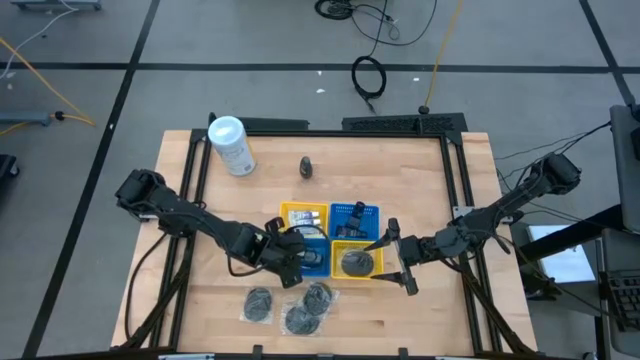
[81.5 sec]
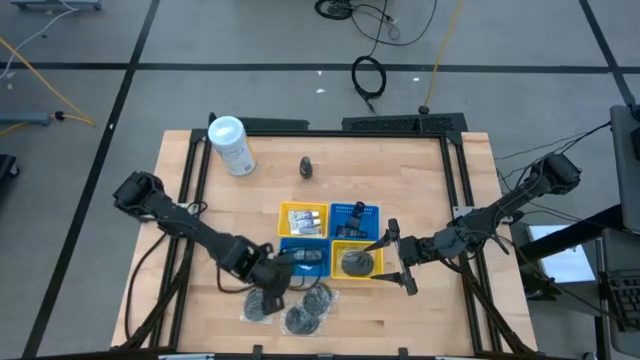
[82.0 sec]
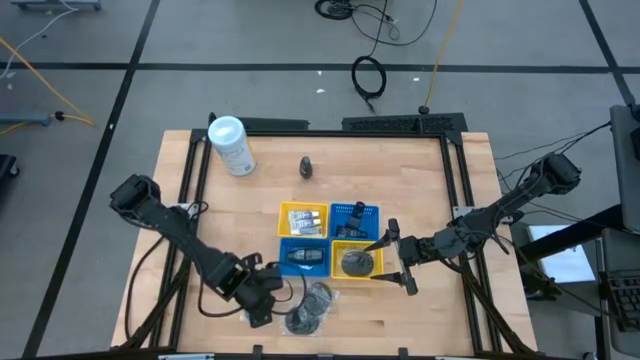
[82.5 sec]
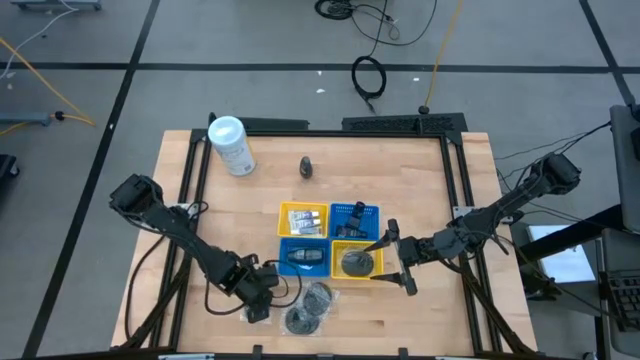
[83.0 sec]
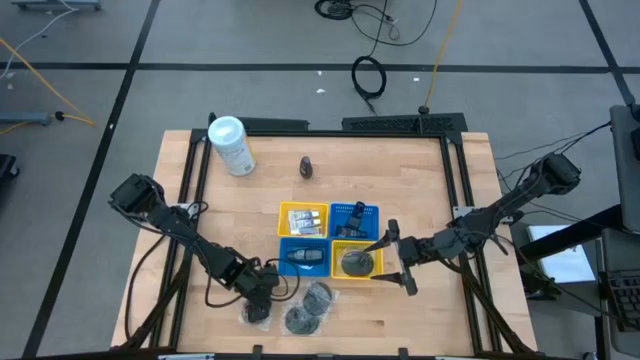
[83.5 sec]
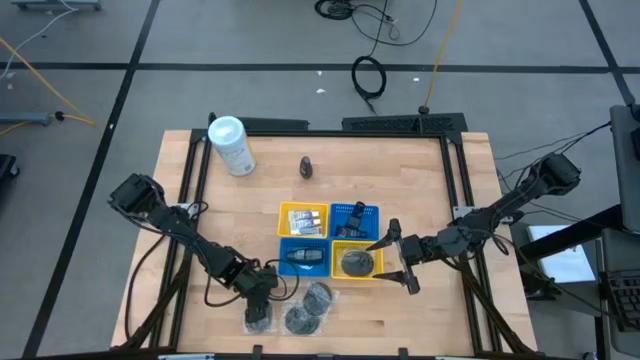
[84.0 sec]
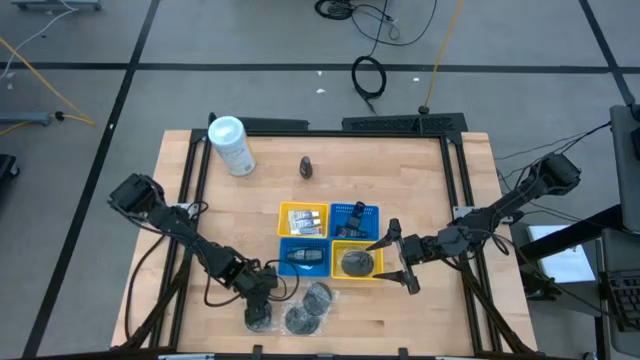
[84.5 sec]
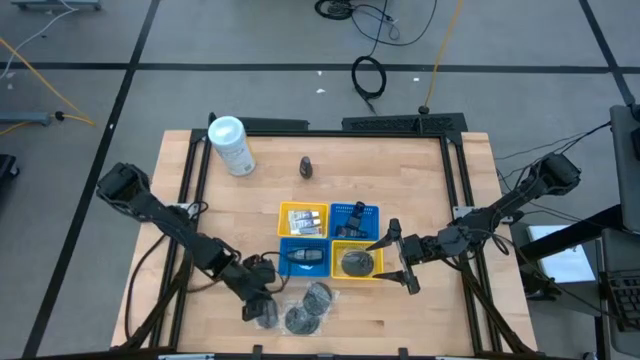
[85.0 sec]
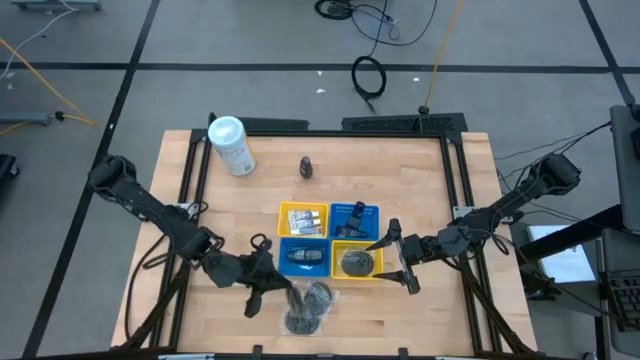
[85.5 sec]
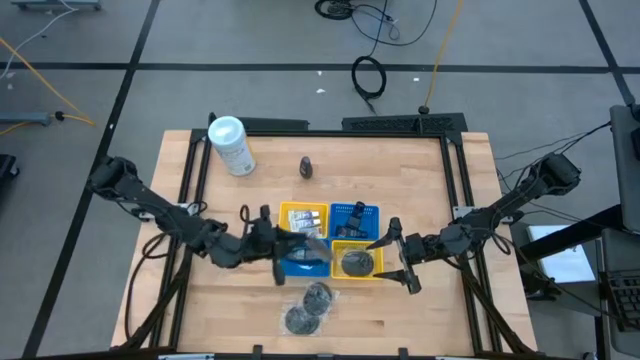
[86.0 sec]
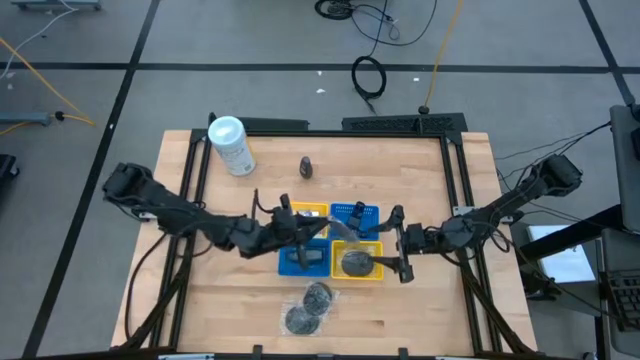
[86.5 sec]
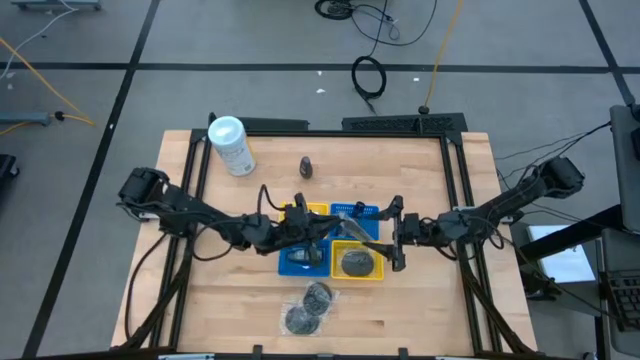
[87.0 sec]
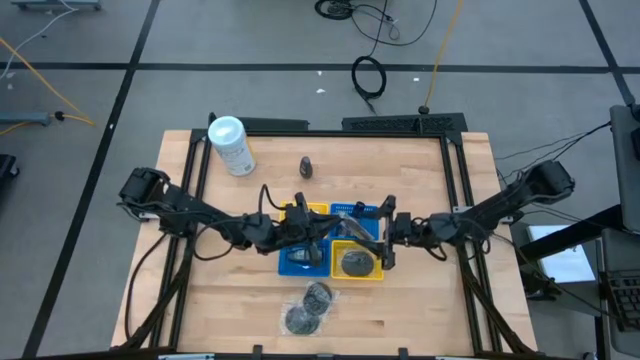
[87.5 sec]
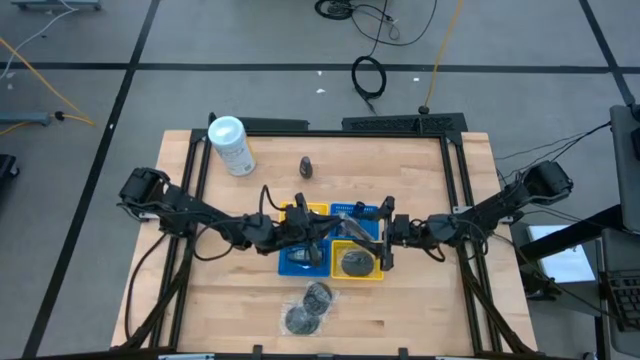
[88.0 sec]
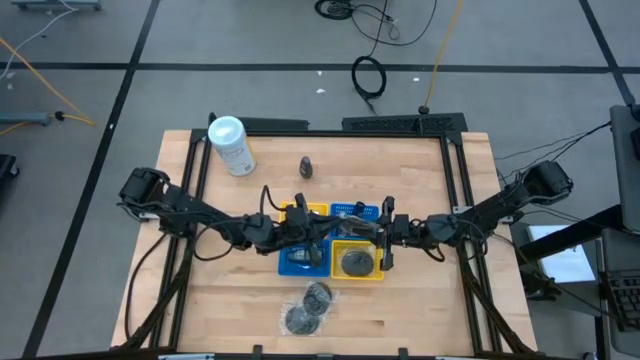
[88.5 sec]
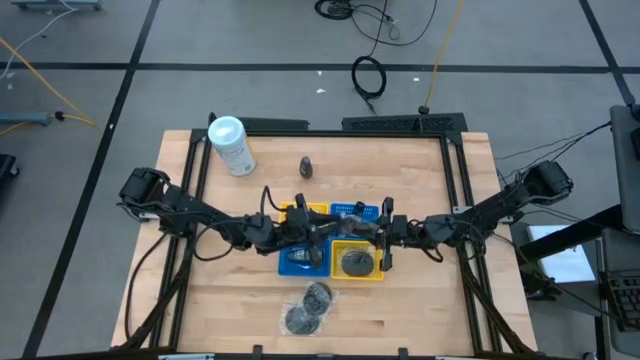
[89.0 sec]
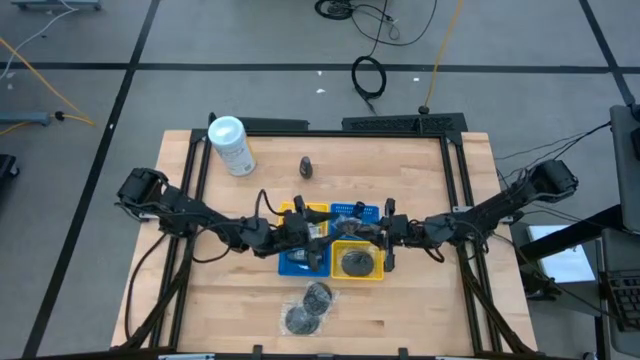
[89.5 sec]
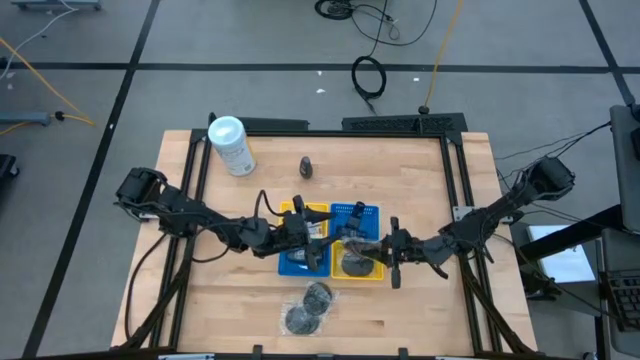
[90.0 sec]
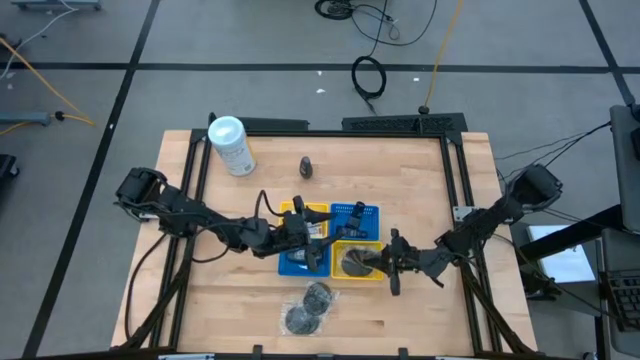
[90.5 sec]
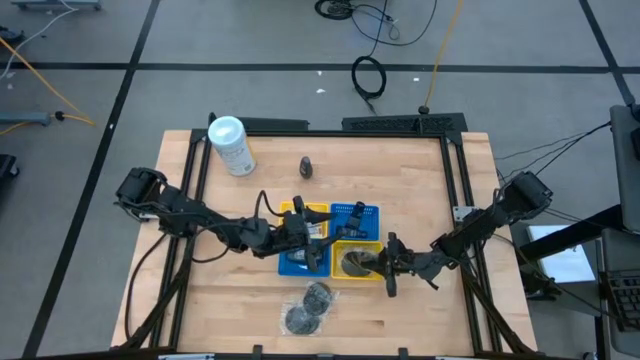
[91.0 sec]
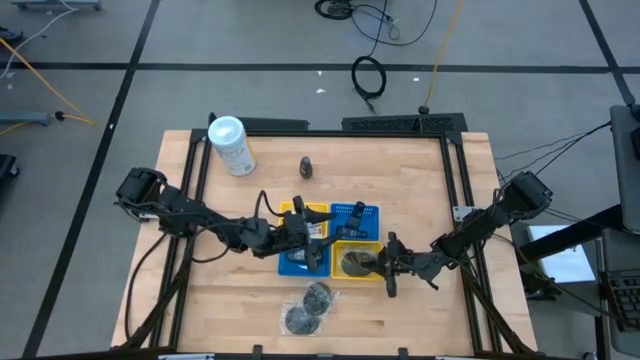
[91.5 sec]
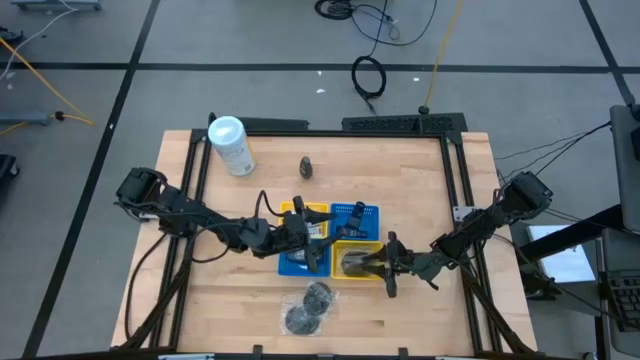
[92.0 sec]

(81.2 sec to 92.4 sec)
Task: Pick & Place Travel size toiletries
Put the black hairbrush into the right yellow bin

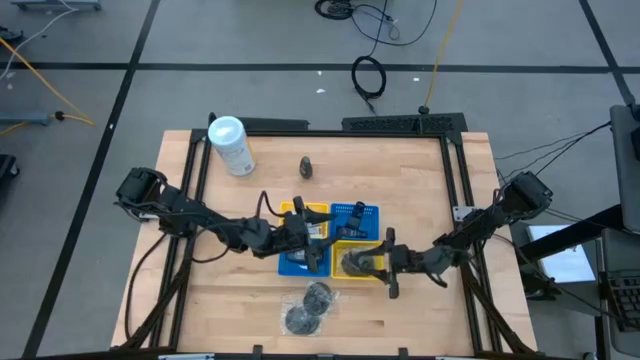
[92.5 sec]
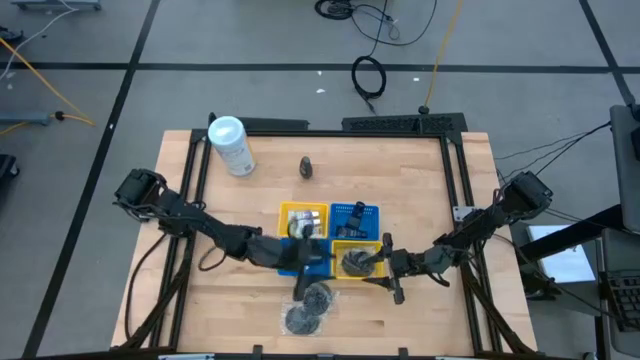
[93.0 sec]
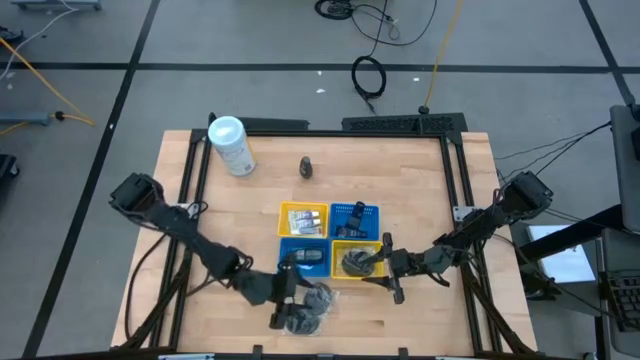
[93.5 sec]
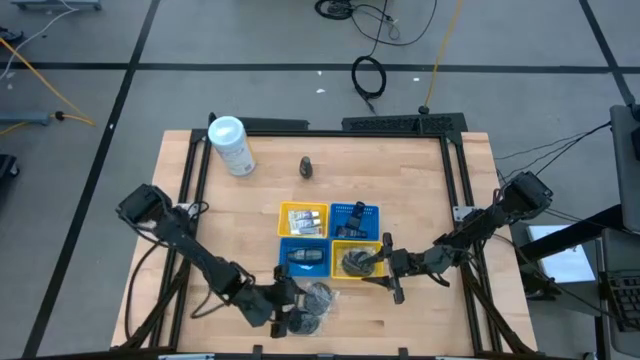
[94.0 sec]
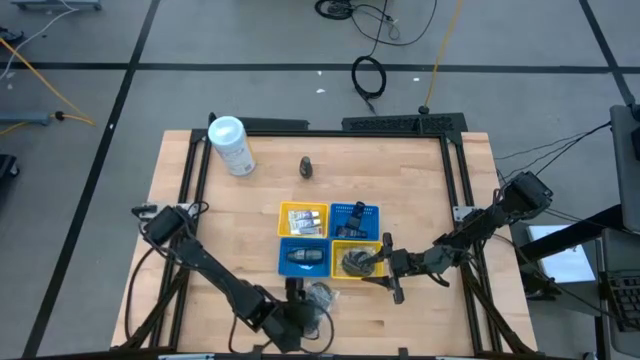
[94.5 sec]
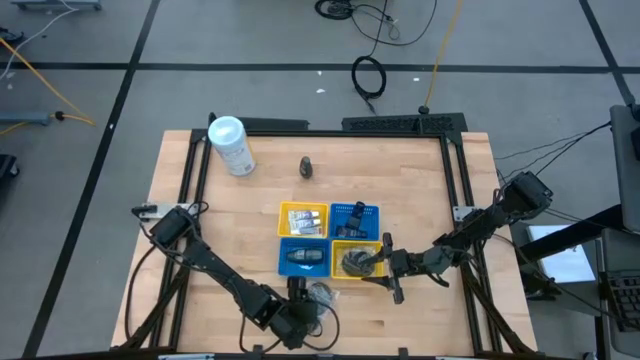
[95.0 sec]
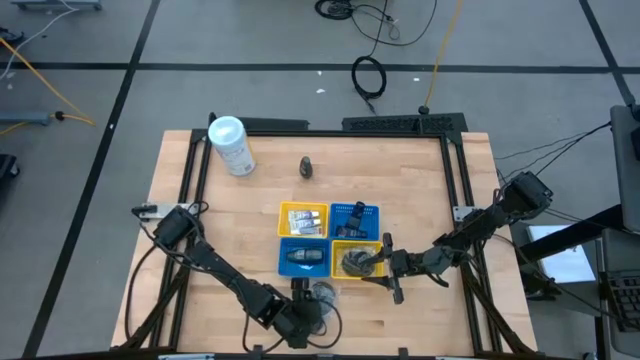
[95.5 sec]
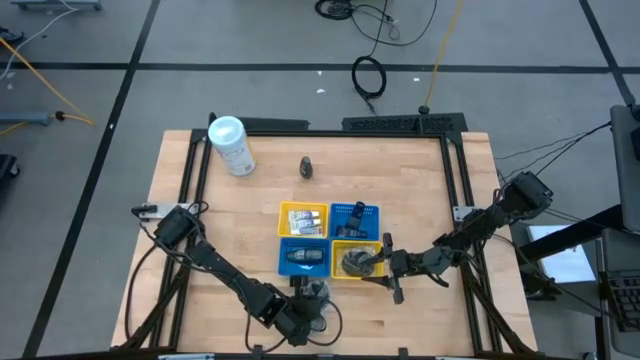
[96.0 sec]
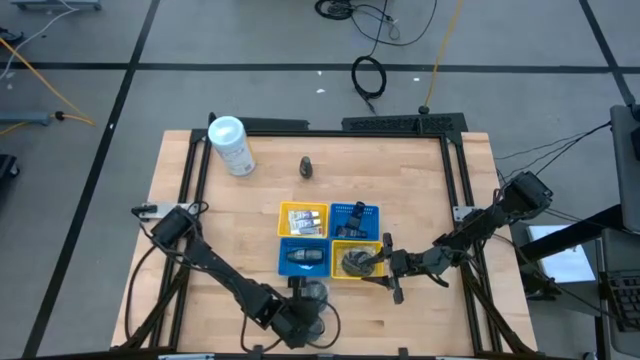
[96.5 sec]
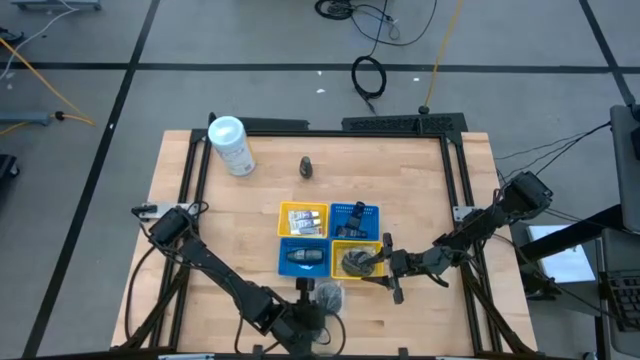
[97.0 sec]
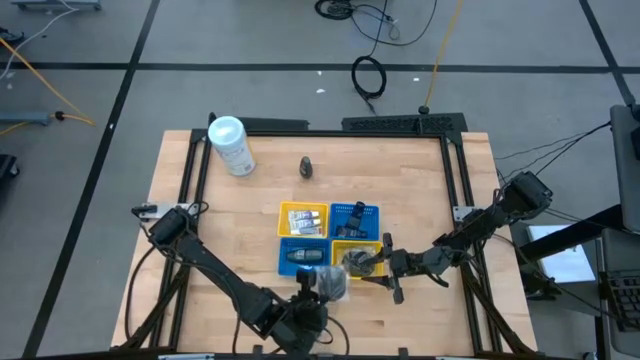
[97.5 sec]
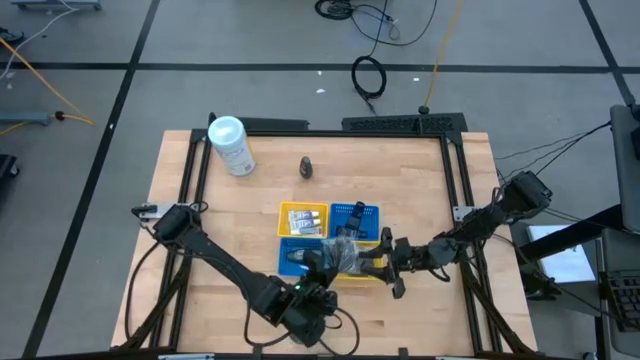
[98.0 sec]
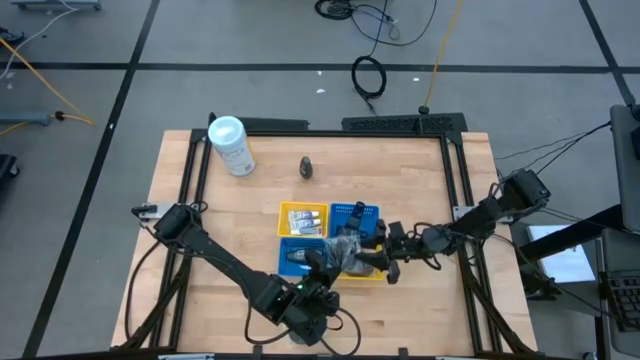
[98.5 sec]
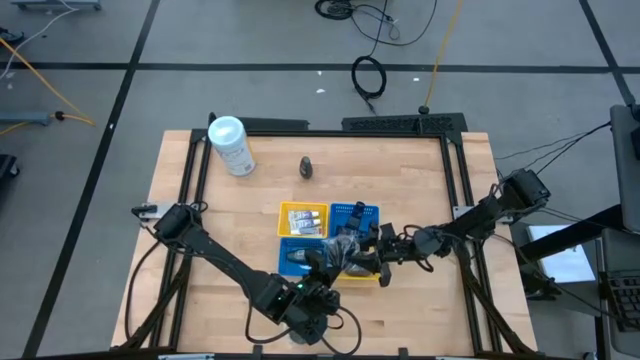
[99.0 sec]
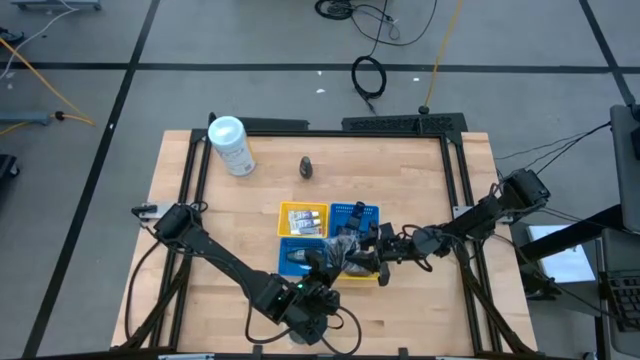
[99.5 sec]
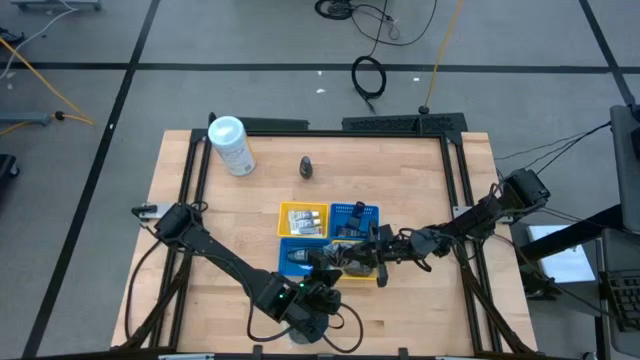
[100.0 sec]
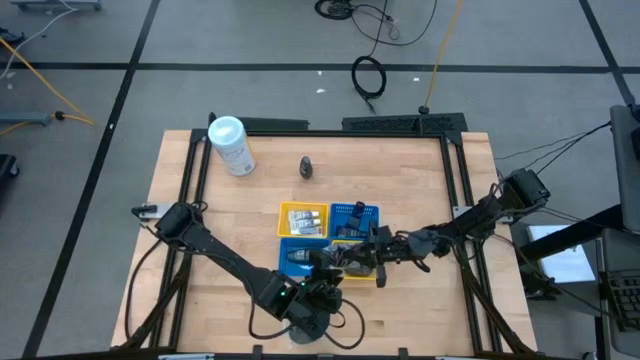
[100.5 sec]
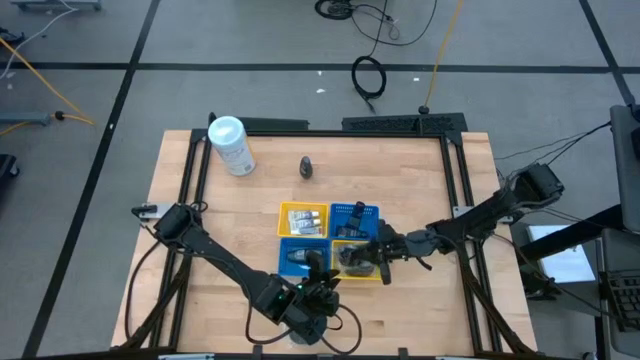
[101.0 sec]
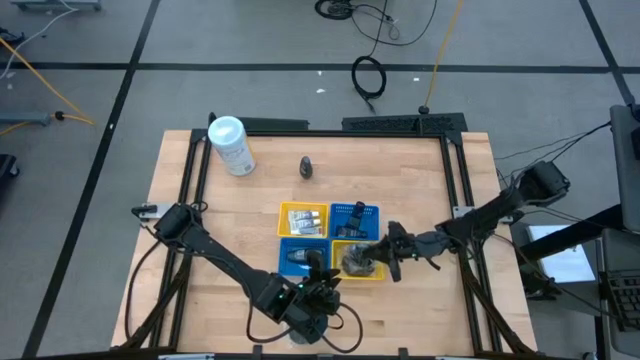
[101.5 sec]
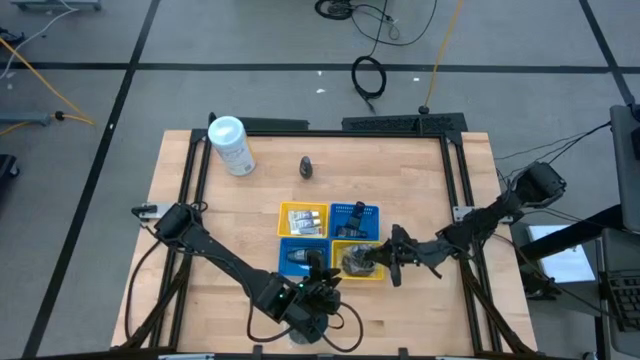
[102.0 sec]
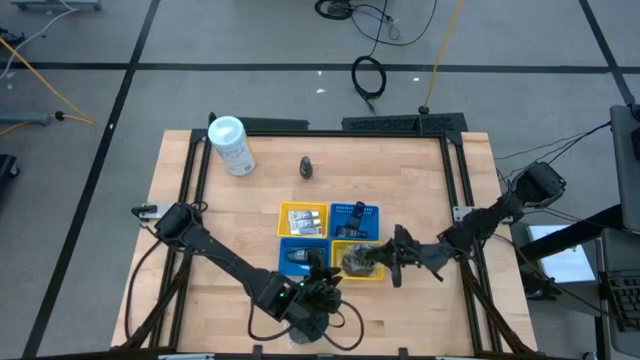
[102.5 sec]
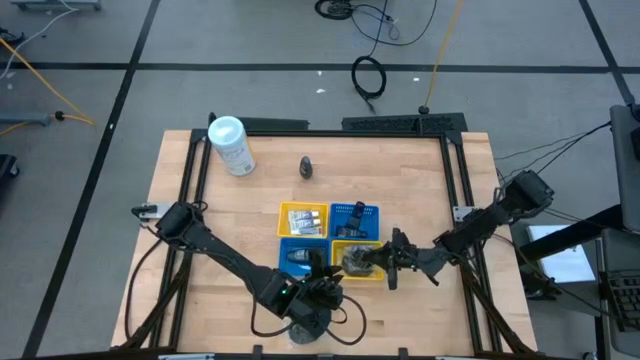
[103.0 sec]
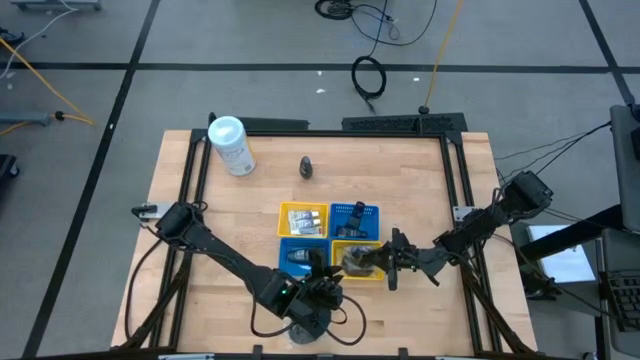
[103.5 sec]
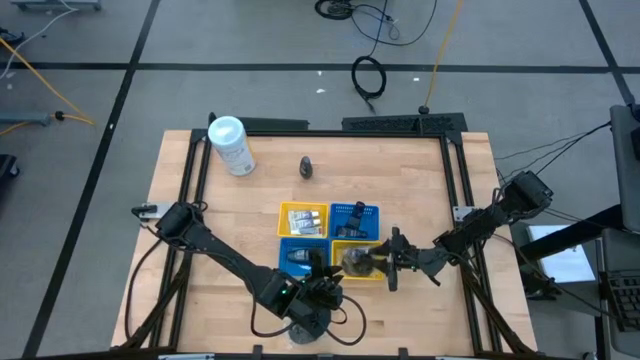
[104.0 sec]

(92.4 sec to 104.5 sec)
Put the black hairbrush into the right yellow bin
